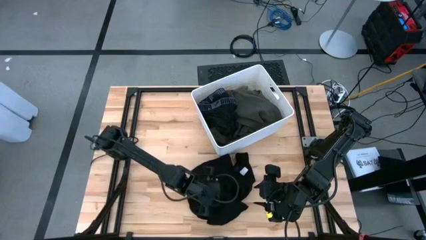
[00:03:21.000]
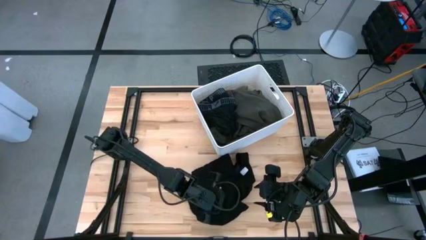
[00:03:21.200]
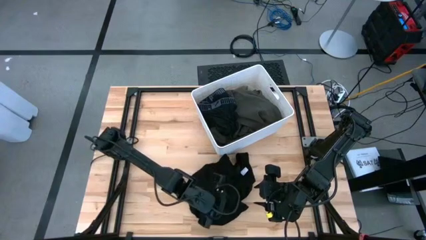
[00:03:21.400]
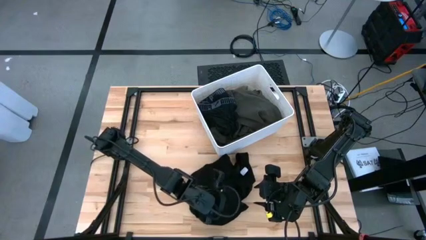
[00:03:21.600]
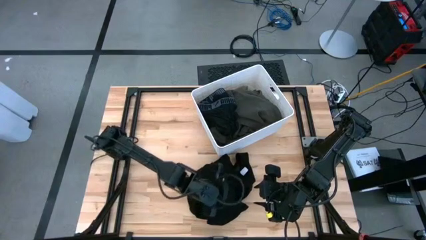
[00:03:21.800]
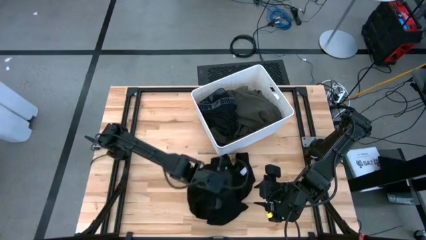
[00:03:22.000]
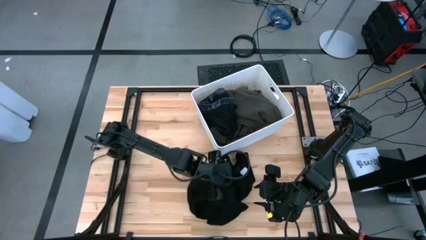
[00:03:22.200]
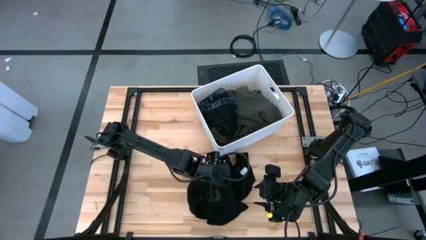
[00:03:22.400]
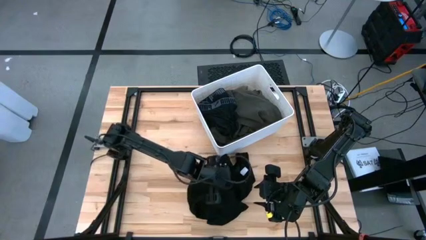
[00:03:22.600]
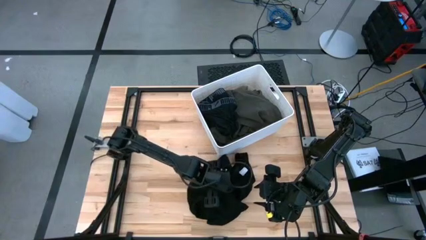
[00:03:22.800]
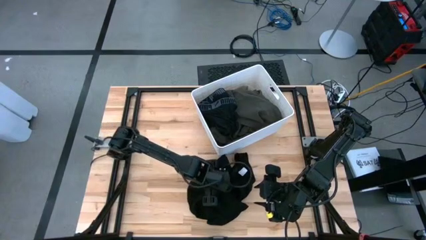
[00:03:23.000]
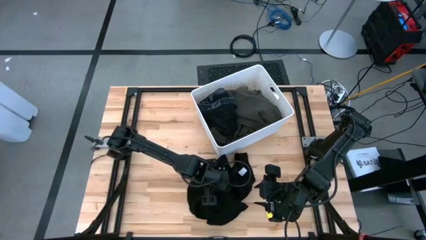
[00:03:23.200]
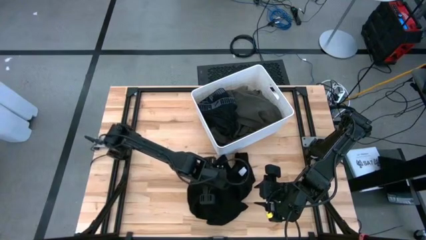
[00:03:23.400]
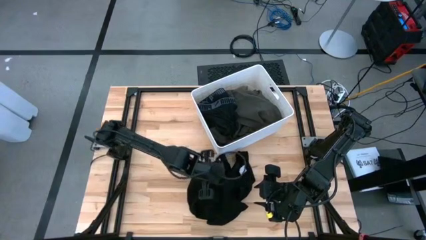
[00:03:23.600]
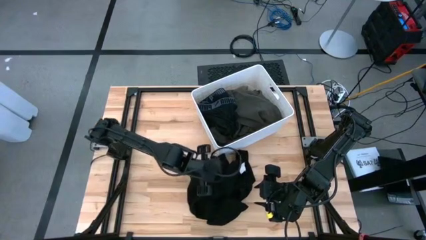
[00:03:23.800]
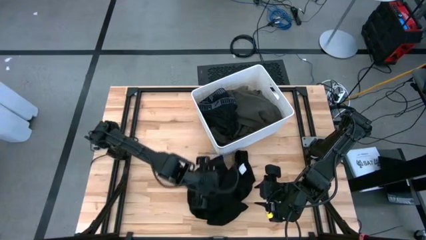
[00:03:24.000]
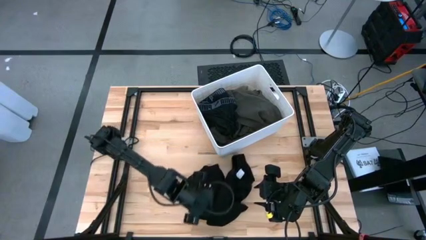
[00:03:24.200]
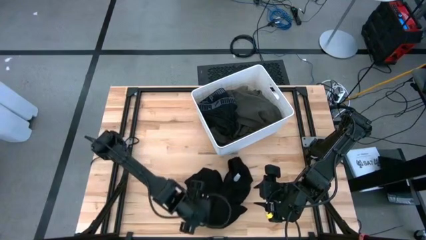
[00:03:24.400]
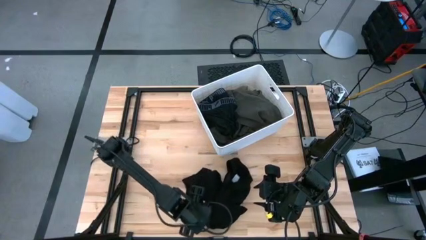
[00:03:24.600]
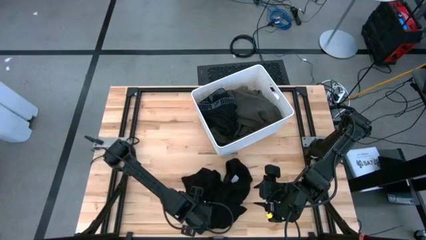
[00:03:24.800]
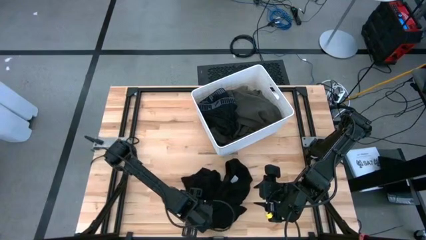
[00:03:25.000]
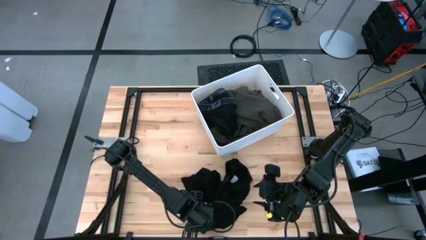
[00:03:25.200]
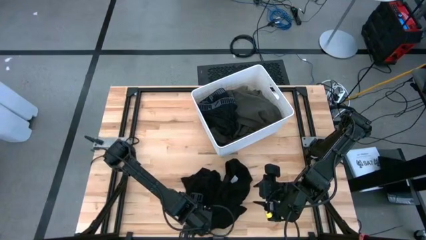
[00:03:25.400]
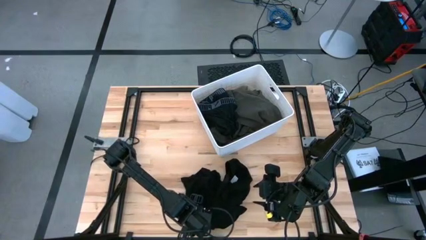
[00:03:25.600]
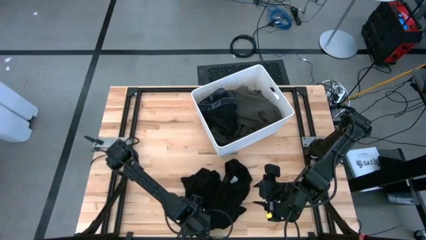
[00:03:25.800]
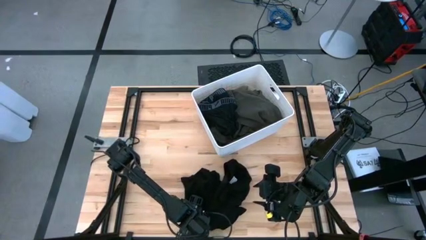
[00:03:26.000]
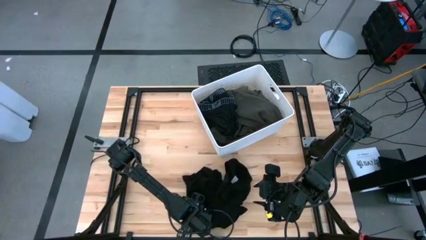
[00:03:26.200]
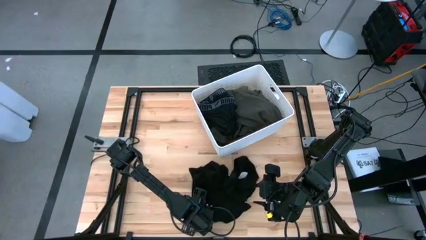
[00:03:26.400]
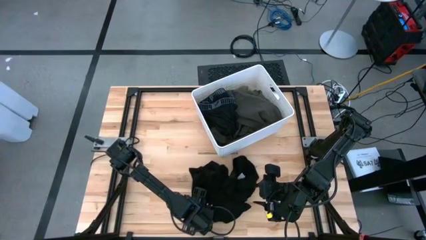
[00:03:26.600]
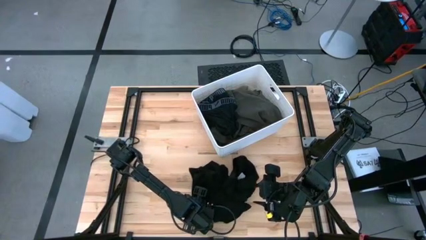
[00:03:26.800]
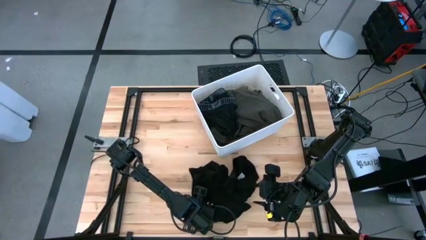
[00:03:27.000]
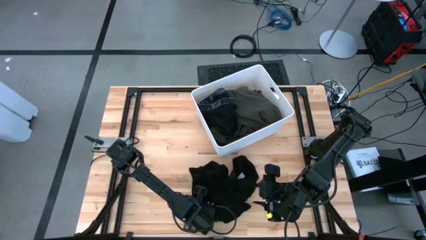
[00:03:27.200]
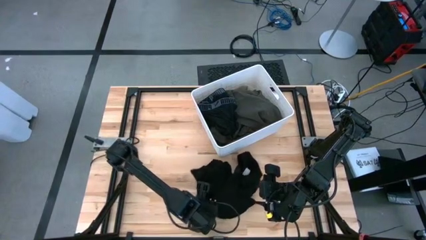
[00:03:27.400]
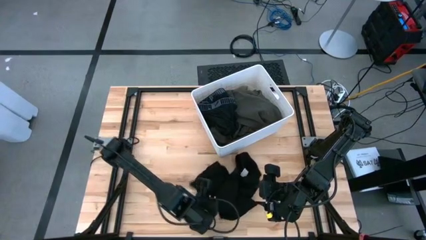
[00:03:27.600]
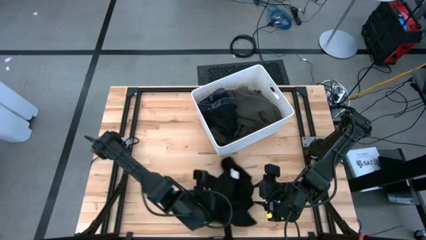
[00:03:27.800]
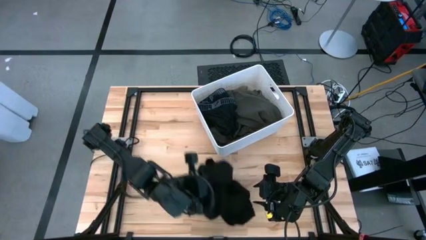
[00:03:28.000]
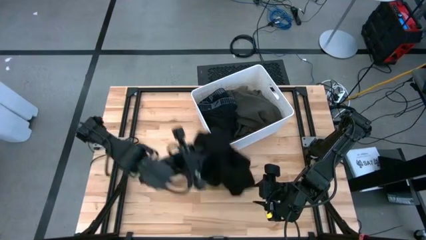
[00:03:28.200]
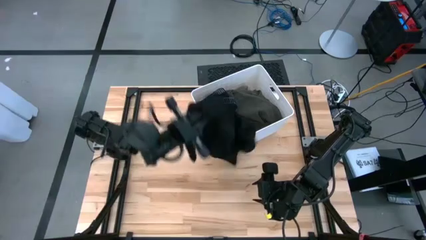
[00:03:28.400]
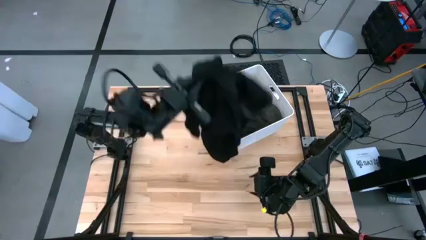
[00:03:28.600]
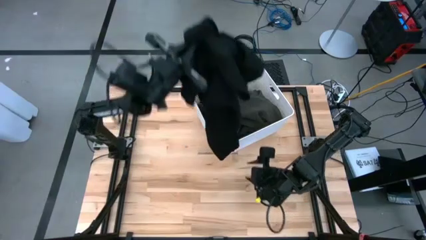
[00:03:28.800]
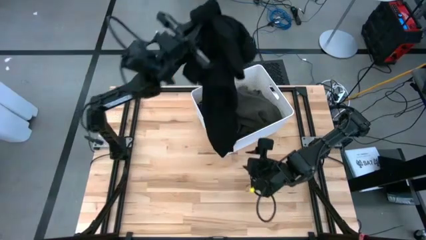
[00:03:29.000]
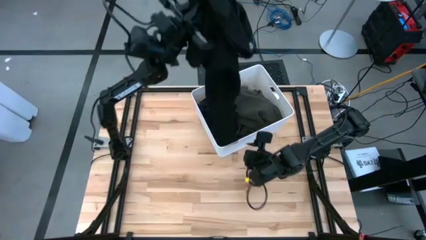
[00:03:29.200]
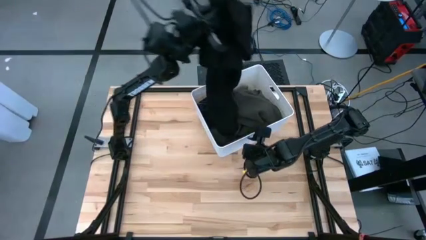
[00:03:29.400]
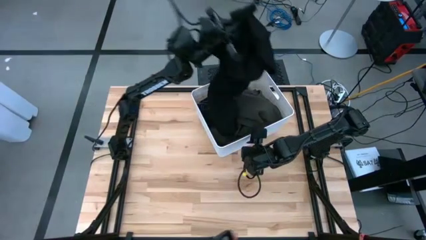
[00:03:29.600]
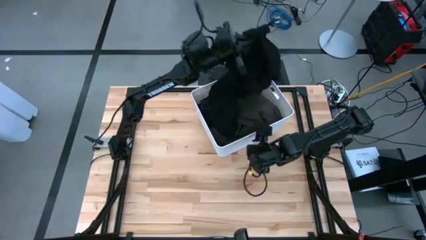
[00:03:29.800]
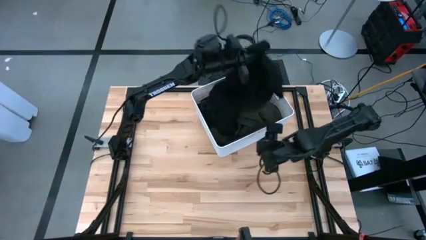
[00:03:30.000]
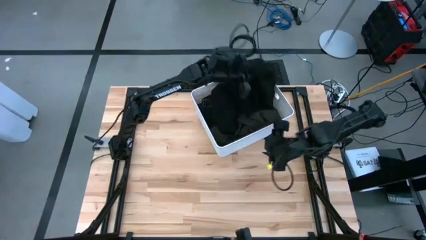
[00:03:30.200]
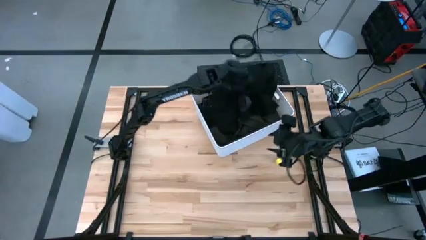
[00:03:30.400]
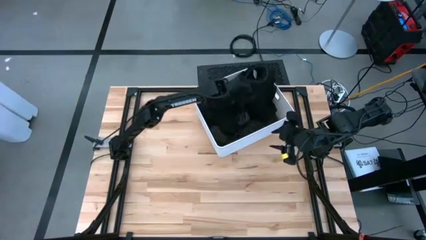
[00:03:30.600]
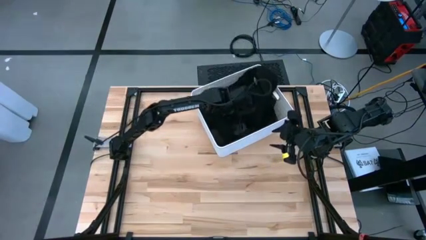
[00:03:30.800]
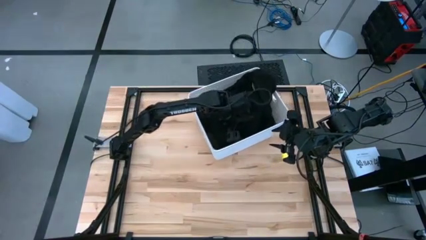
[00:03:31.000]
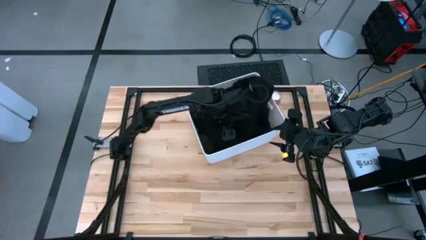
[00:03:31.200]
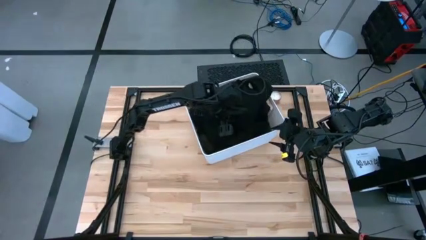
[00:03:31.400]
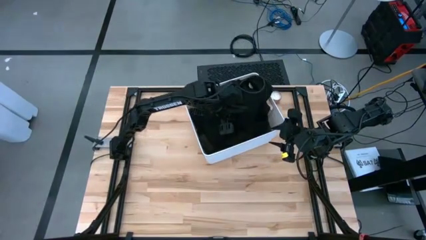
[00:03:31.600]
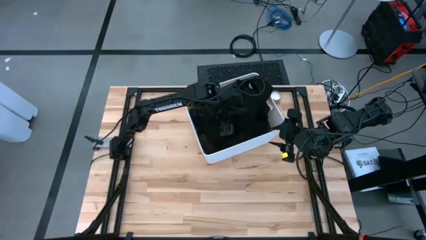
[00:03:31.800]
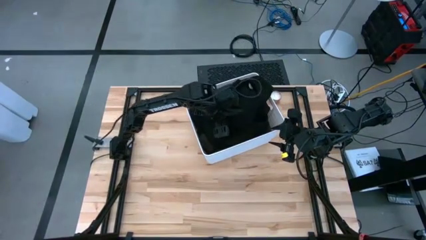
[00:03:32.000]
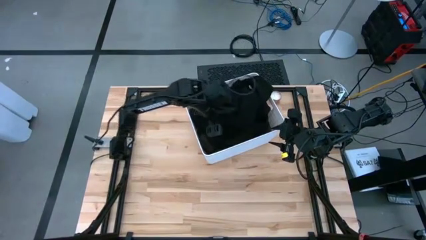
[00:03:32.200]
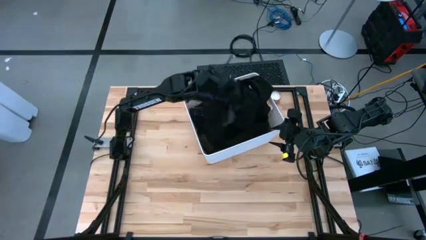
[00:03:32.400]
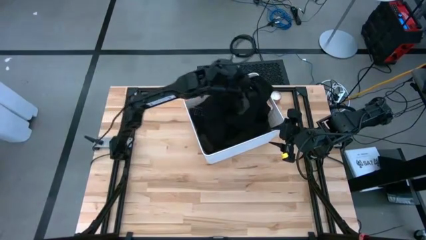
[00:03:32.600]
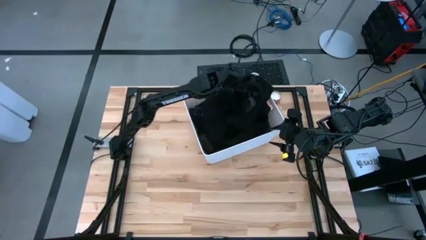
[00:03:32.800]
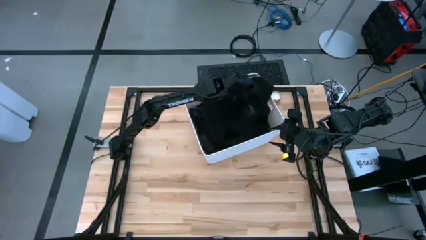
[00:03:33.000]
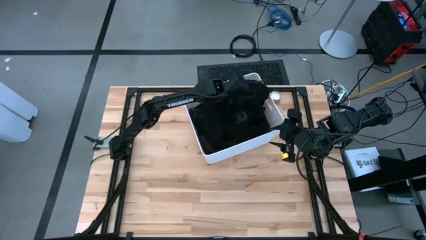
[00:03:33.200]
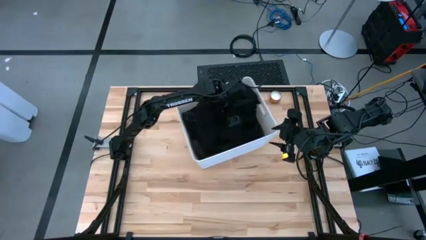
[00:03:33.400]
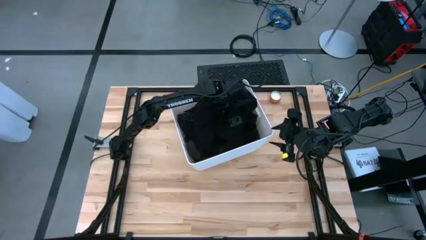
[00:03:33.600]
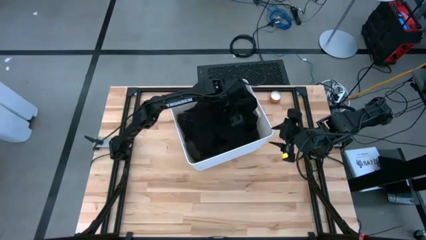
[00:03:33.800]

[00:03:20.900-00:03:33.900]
Task: Sort clothes
Put the black shirt into the white bin

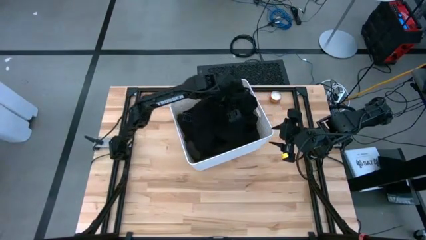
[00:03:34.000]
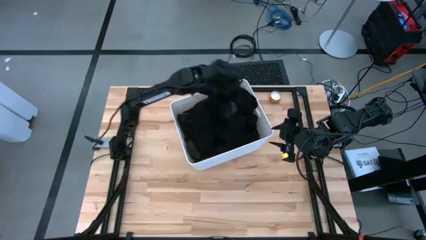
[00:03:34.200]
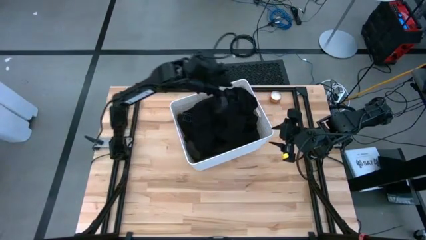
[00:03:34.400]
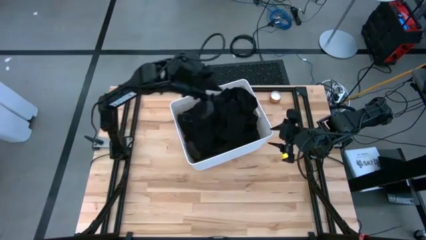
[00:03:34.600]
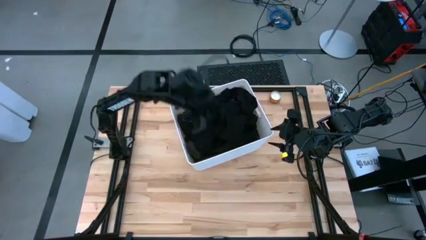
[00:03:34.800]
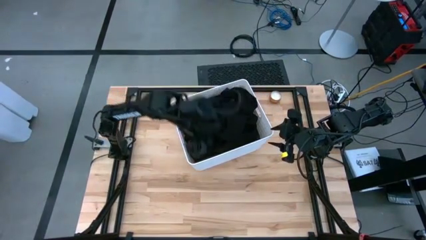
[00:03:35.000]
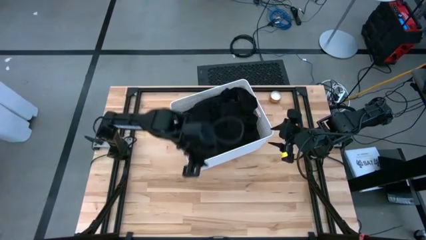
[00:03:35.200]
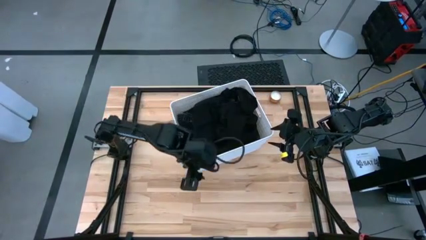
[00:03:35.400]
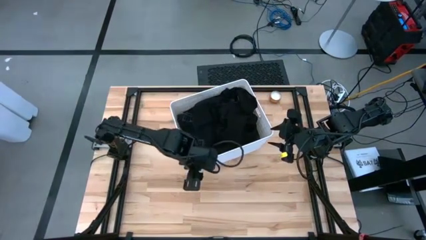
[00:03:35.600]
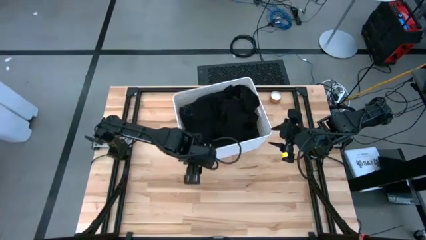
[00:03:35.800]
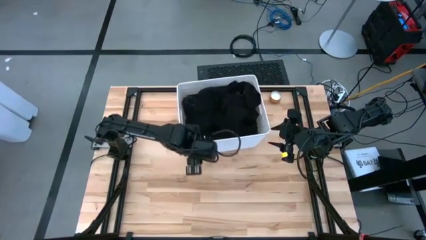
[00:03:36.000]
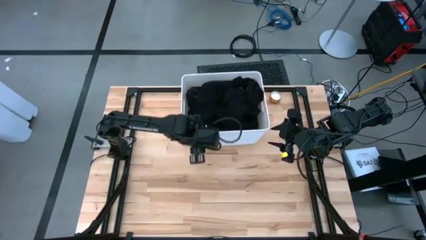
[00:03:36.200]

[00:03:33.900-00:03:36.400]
Adjust the white bin
